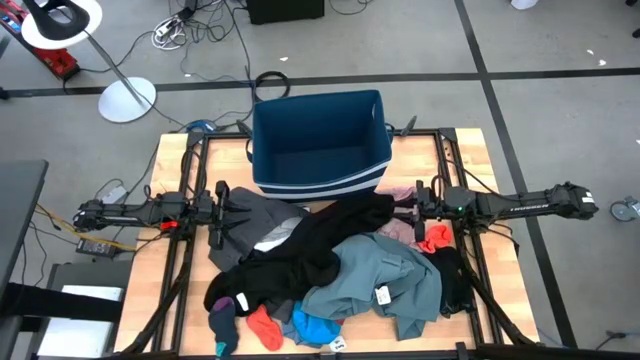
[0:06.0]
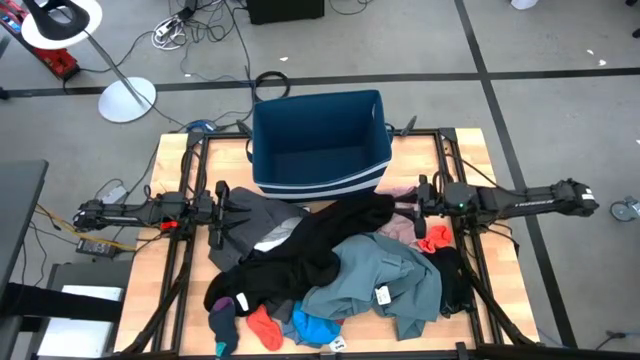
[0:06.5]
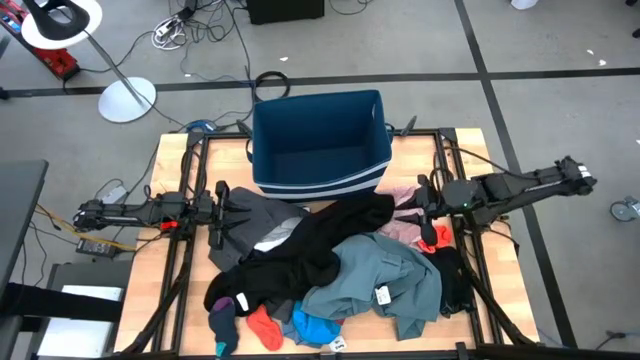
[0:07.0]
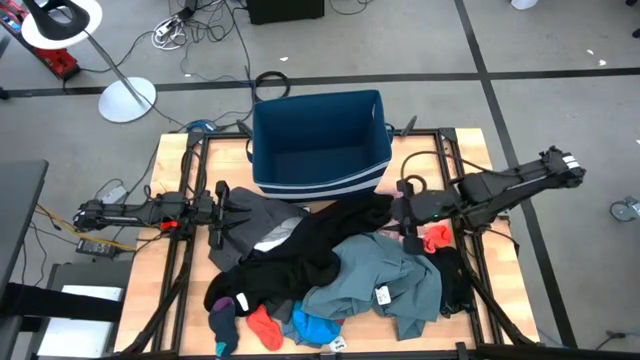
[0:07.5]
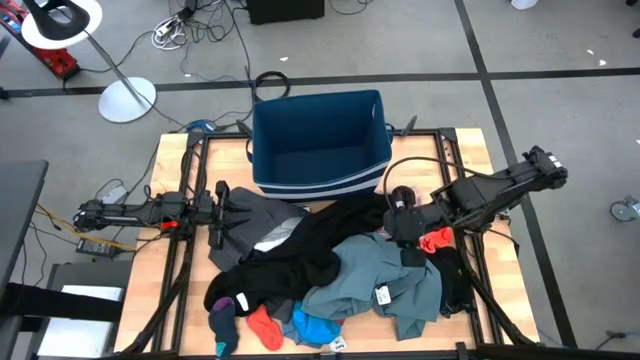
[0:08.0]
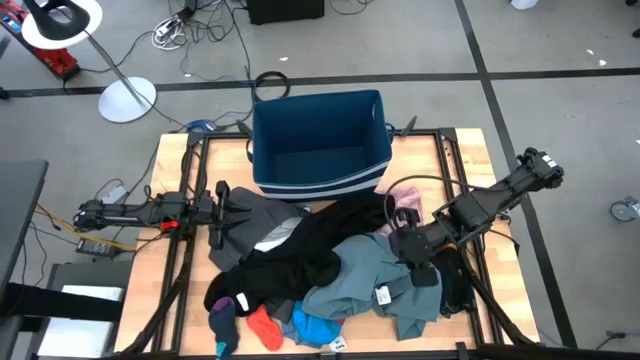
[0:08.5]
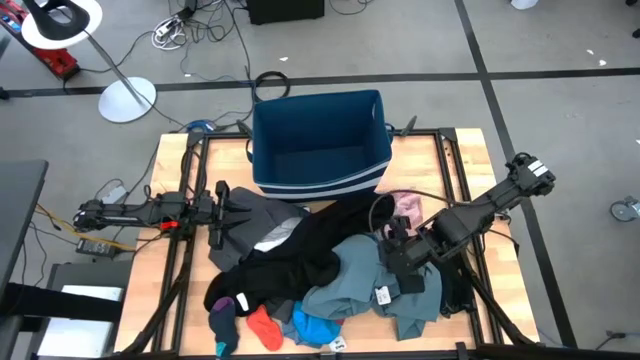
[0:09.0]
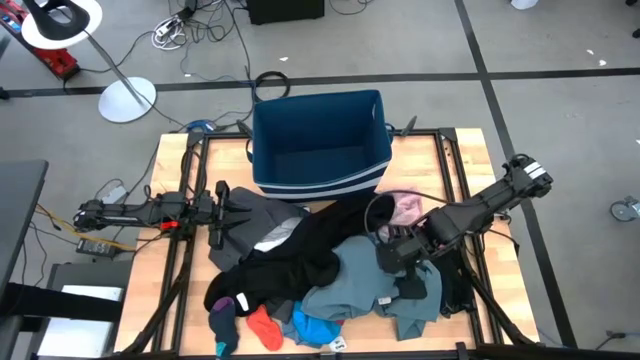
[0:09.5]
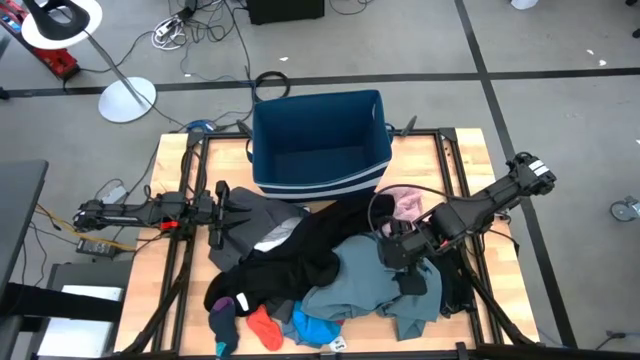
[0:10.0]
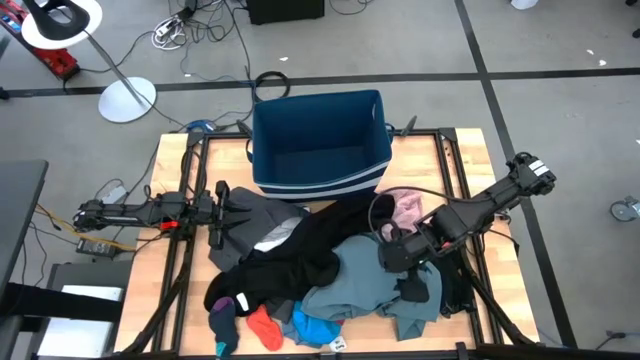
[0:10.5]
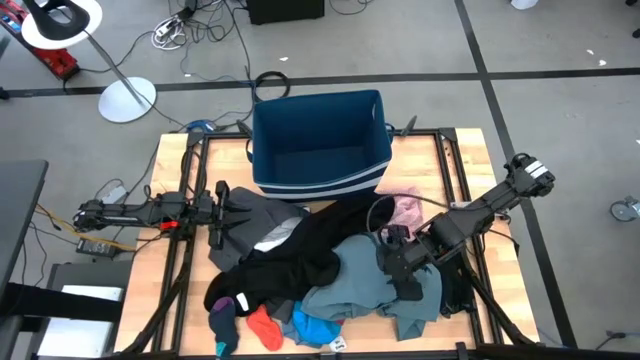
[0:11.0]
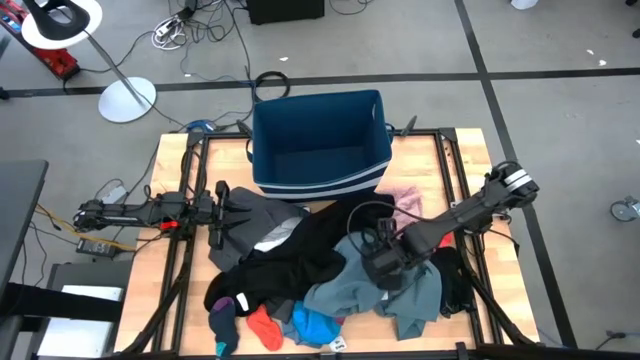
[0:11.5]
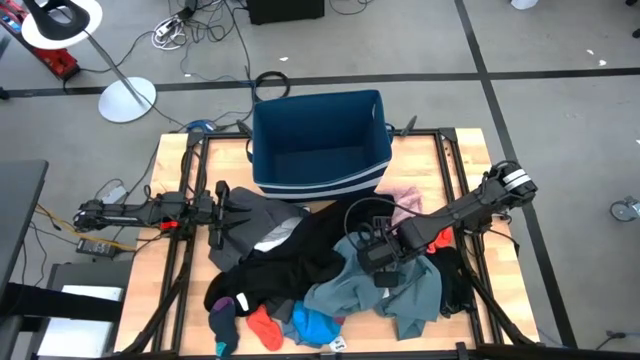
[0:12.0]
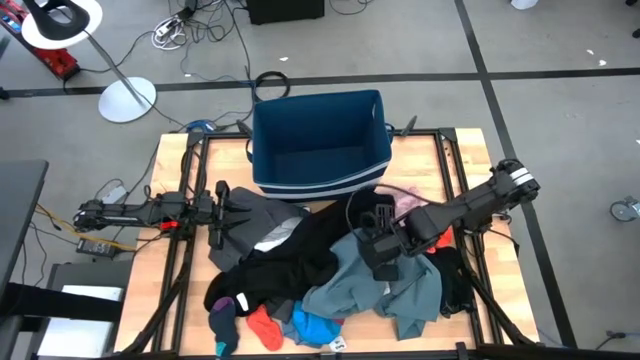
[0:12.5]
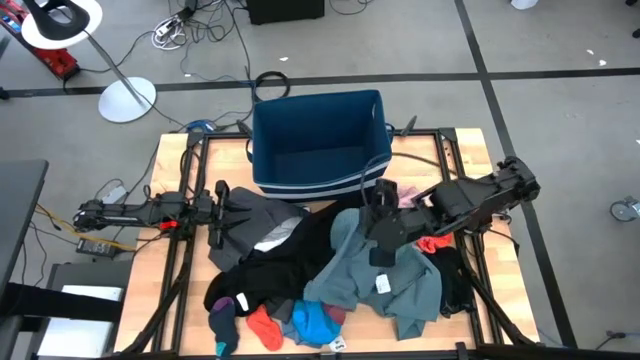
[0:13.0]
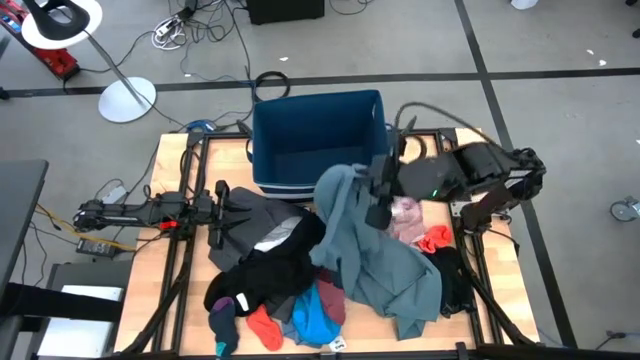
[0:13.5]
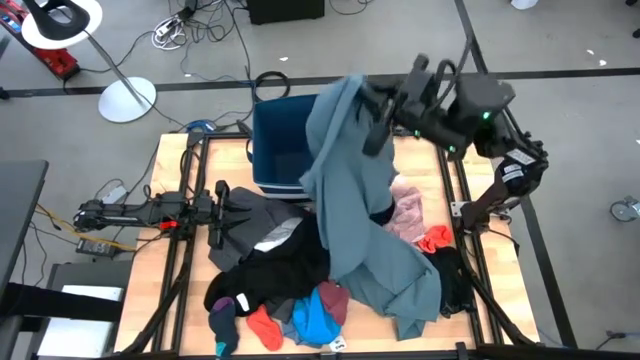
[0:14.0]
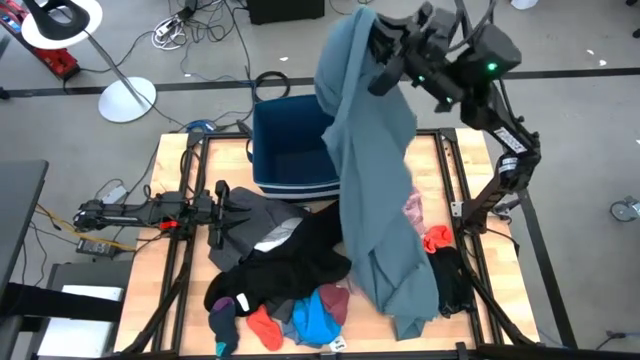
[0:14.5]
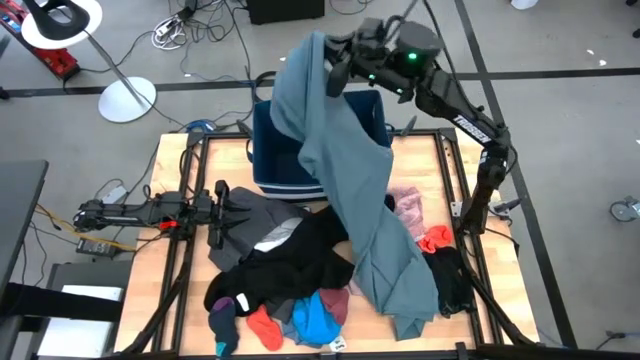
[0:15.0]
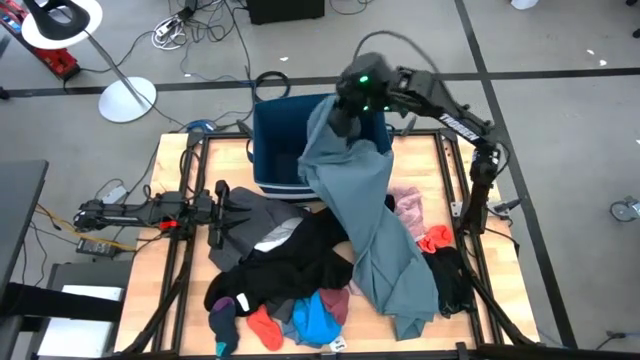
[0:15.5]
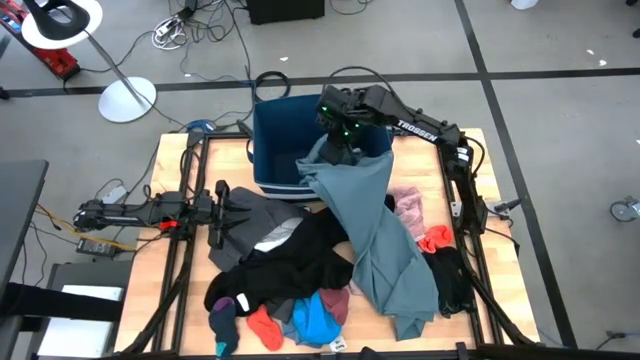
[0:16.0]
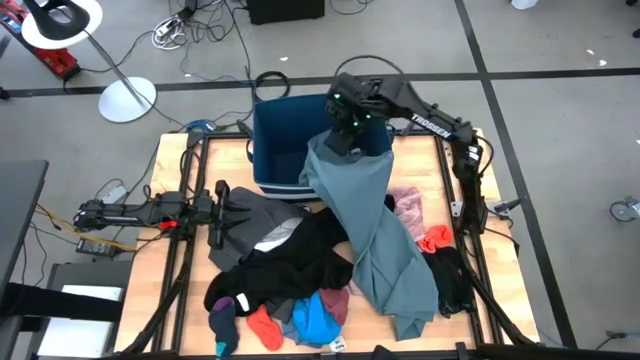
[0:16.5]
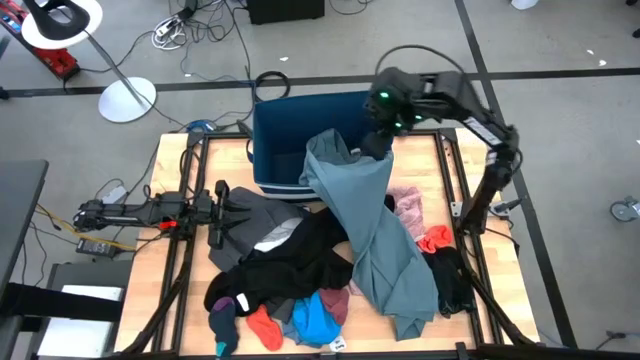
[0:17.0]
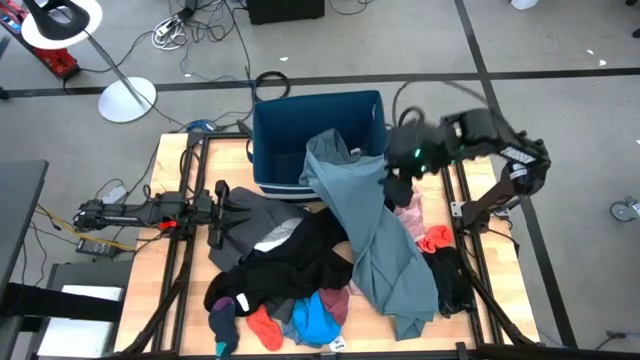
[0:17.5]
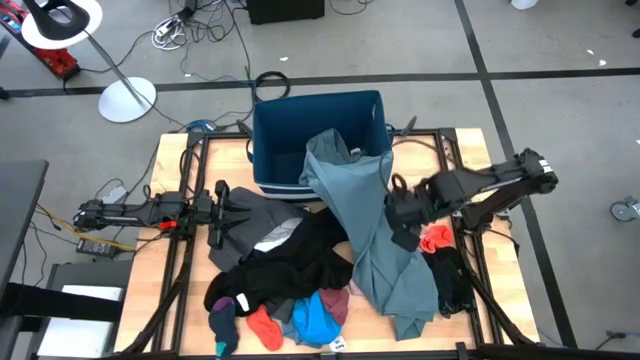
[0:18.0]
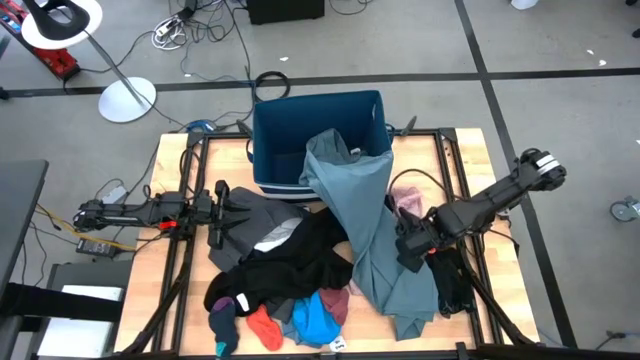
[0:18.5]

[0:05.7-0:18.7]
Task: Sort clothes
Put the blue pants into the laundry bin
